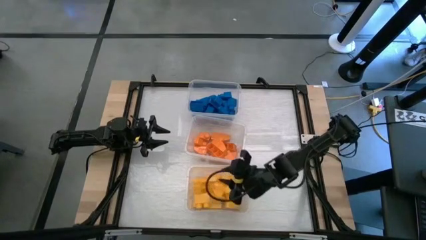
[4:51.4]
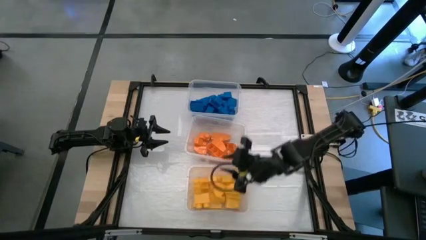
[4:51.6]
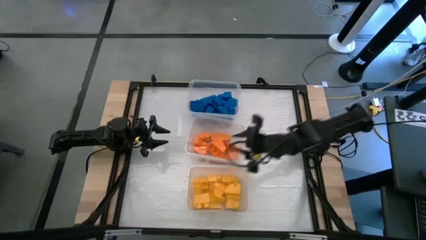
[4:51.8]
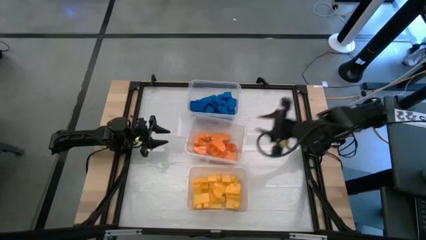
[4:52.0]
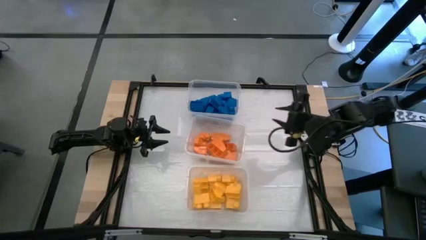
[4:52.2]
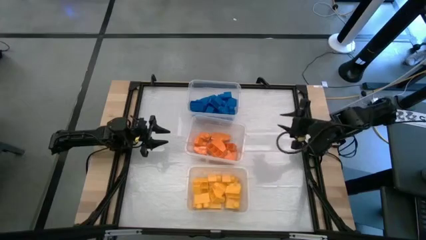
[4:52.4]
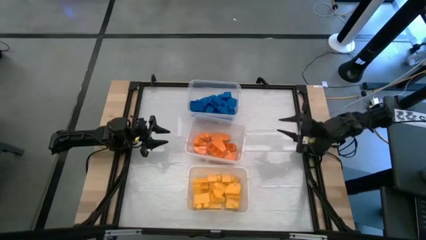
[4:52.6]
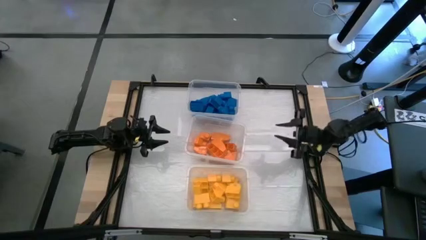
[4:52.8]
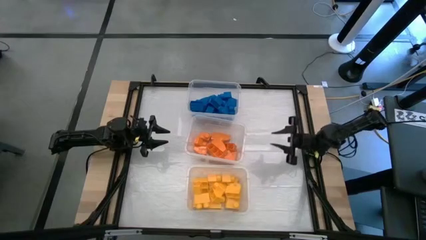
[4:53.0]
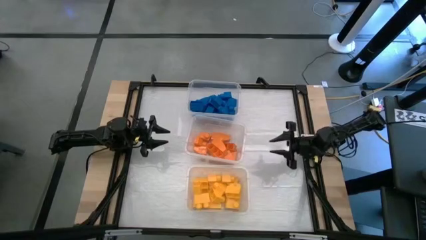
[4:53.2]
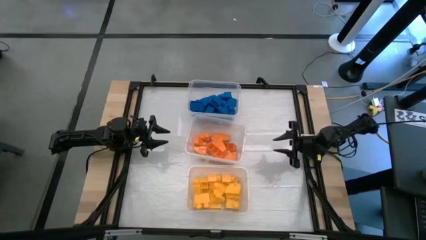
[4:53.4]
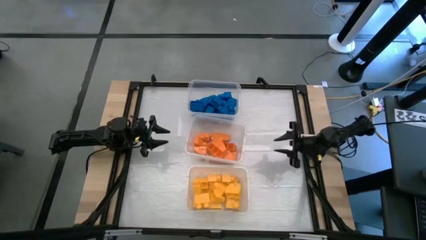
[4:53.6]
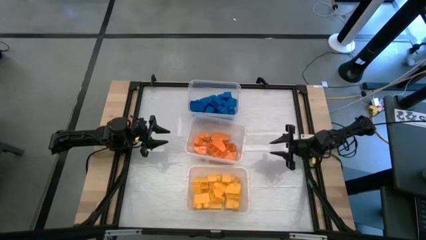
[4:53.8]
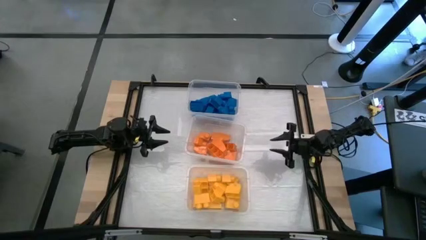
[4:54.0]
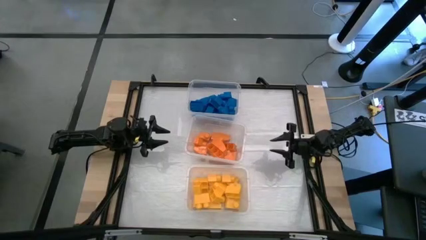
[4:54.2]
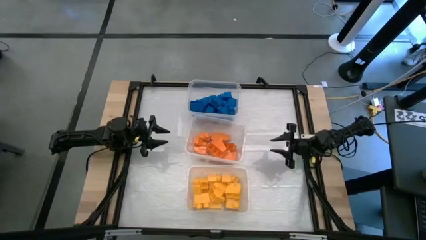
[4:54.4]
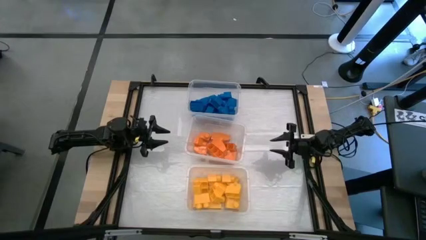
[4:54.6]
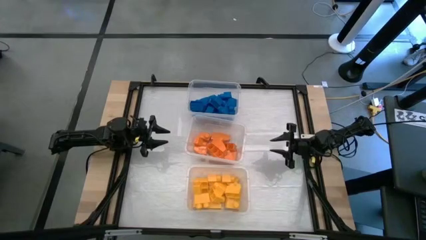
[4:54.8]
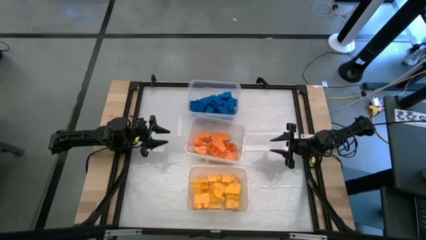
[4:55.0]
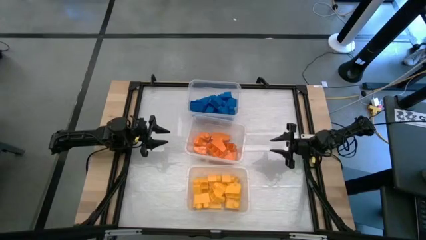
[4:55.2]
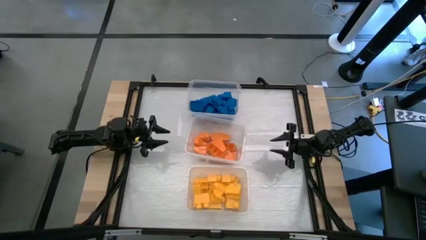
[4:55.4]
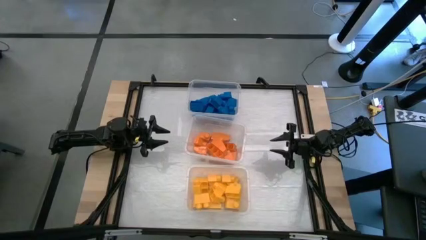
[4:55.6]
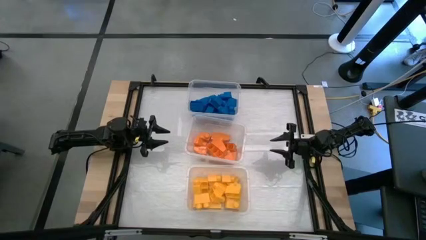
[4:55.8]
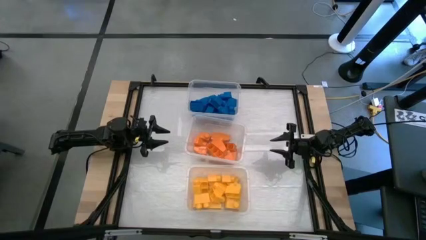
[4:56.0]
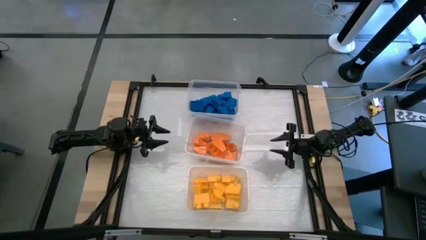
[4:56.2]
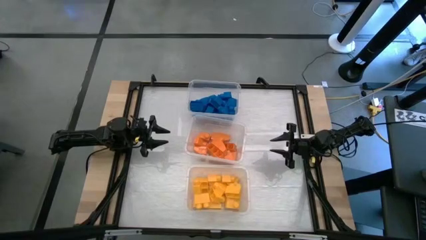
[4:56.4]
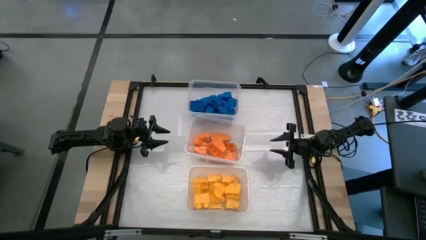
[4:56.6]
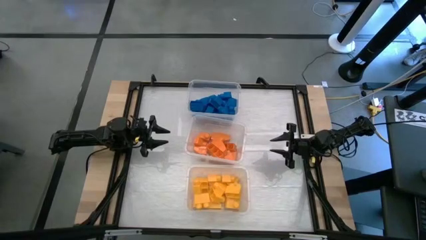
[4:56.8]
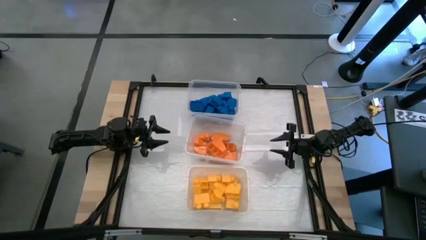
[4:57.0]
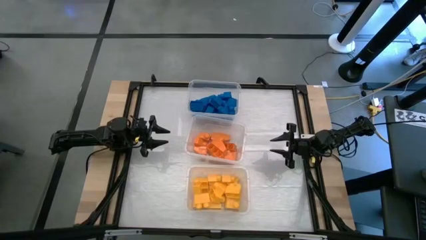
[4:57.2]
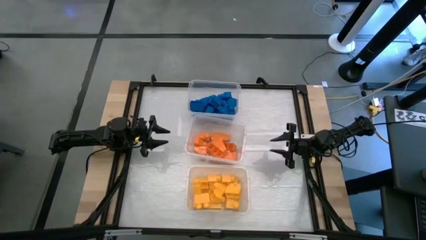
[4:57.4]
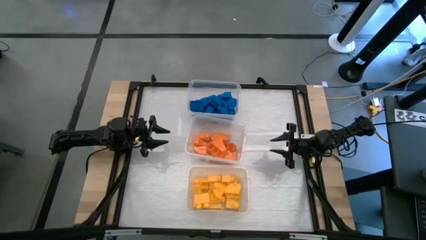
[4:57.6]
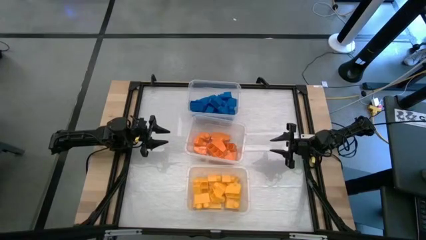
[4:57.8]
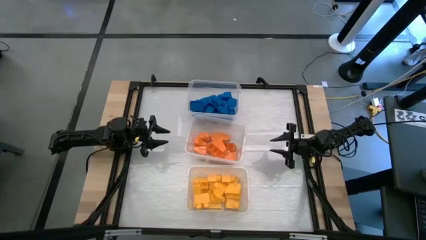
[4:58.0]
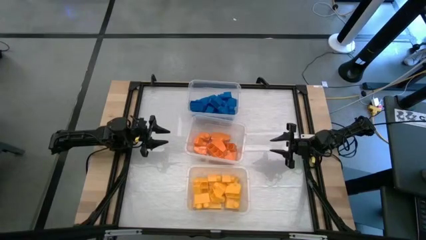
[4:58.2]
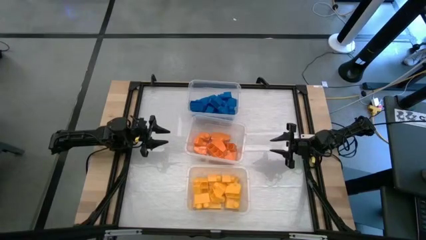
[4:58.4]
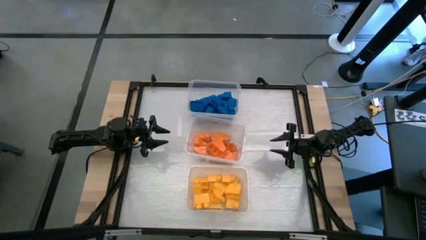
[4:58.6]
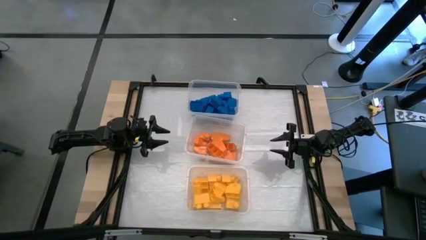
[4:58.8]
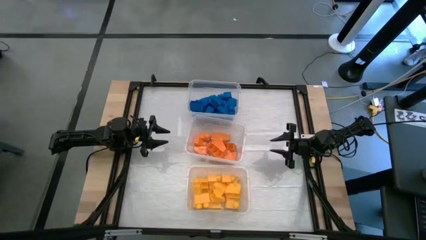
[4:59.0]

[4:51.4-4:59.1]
Task: Sort blocks
Return to Home Position

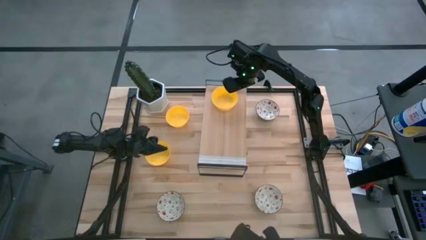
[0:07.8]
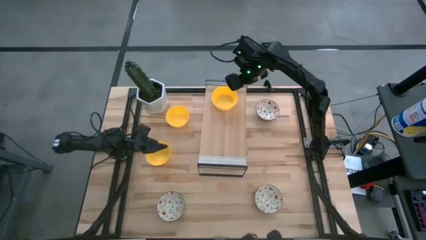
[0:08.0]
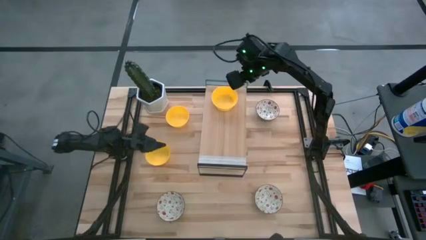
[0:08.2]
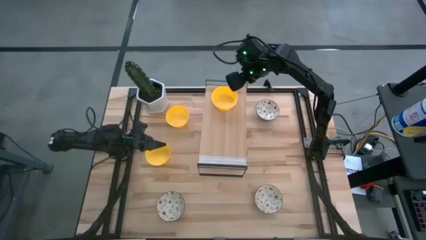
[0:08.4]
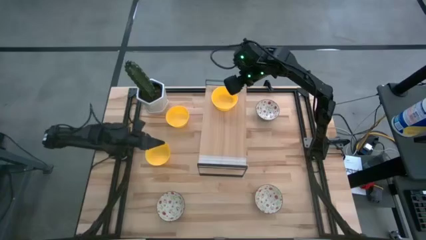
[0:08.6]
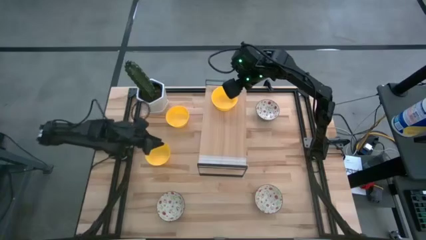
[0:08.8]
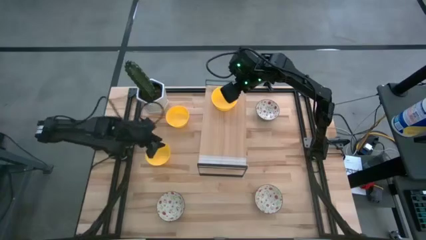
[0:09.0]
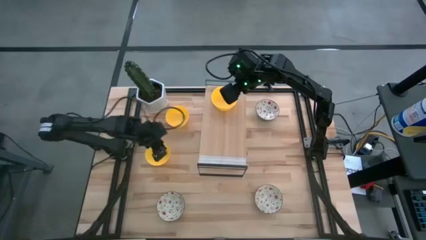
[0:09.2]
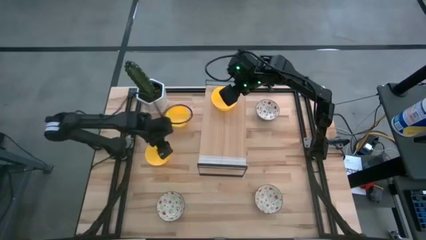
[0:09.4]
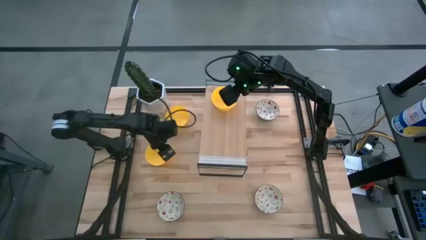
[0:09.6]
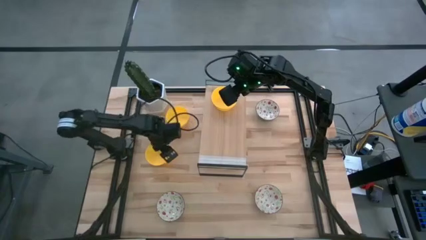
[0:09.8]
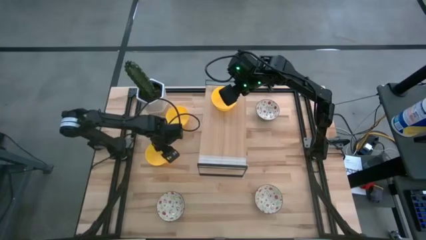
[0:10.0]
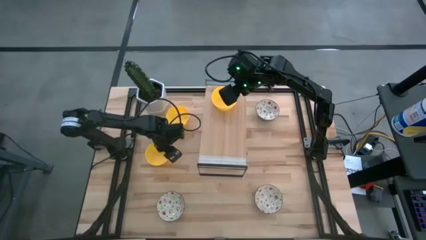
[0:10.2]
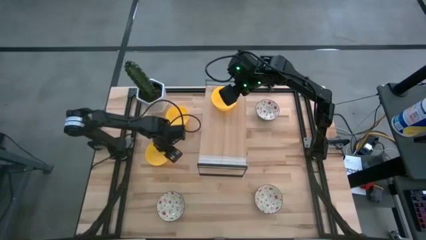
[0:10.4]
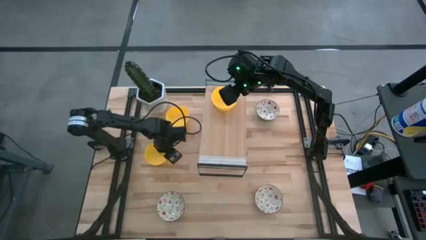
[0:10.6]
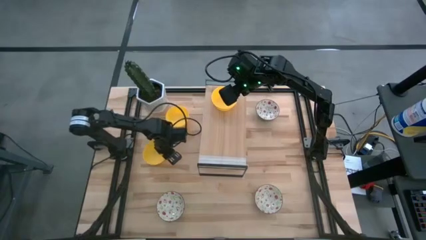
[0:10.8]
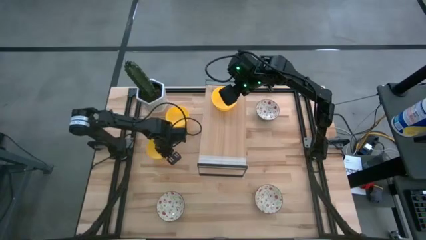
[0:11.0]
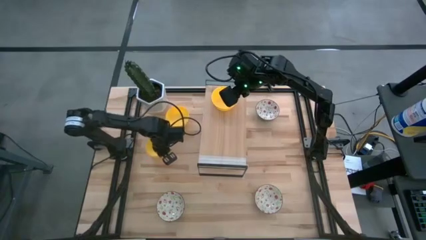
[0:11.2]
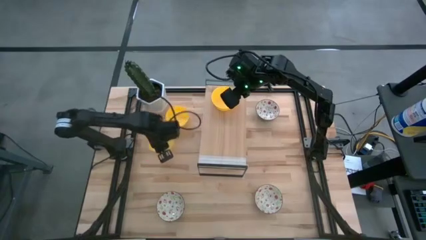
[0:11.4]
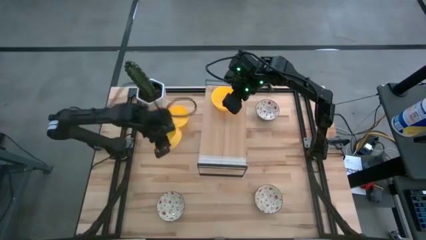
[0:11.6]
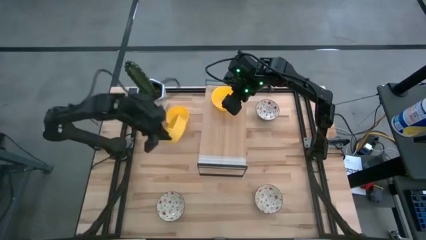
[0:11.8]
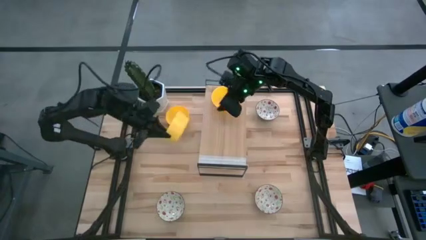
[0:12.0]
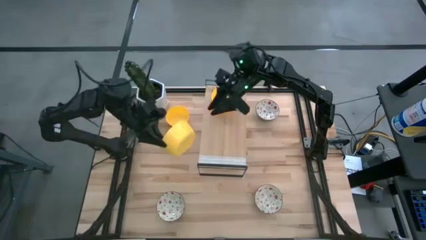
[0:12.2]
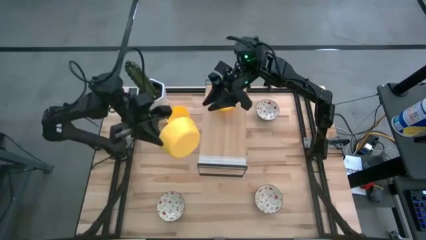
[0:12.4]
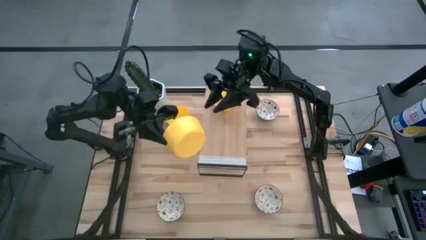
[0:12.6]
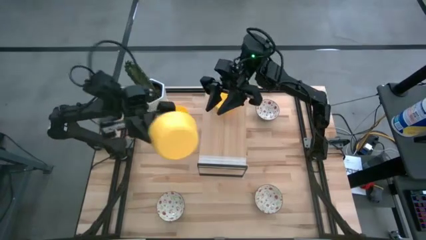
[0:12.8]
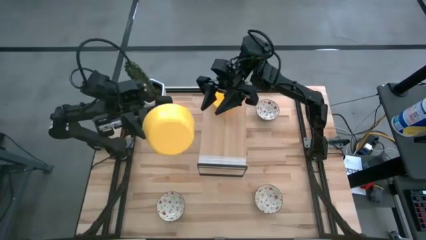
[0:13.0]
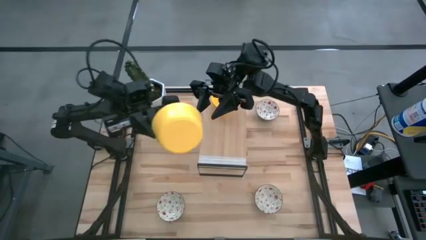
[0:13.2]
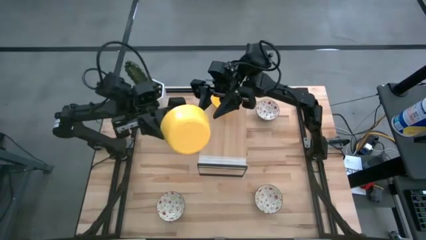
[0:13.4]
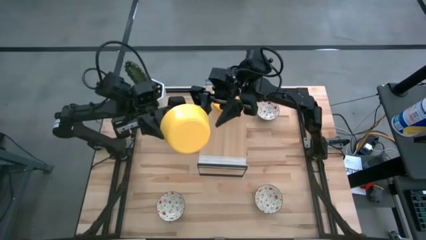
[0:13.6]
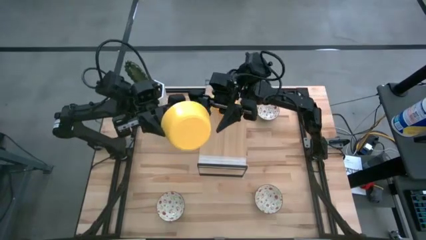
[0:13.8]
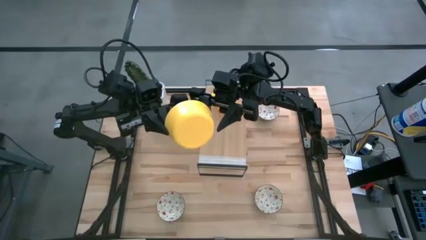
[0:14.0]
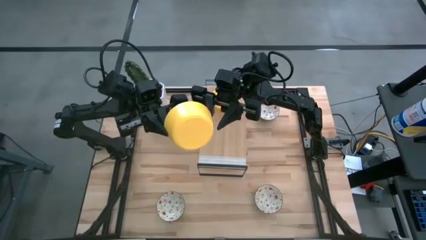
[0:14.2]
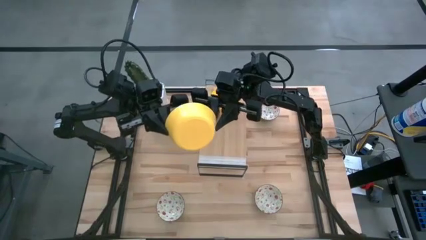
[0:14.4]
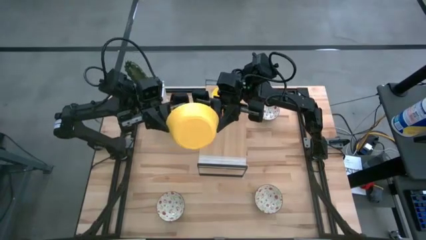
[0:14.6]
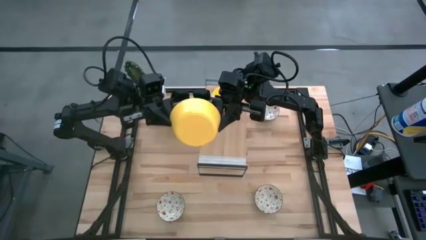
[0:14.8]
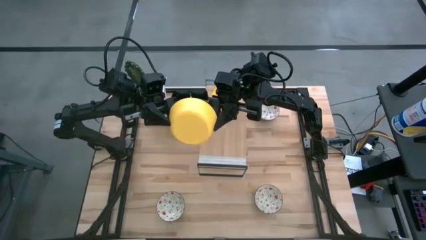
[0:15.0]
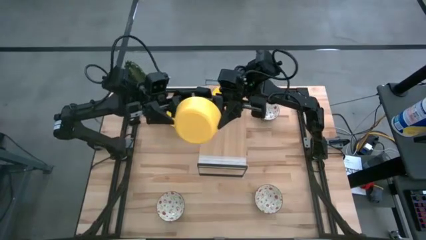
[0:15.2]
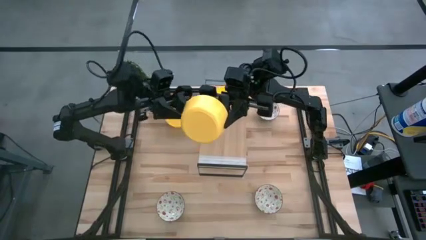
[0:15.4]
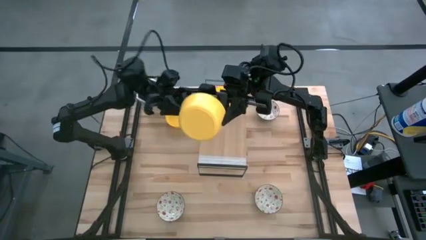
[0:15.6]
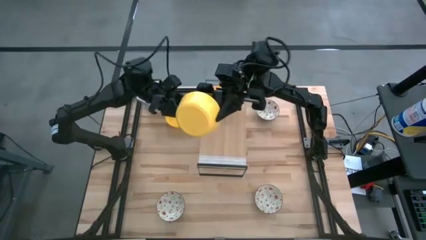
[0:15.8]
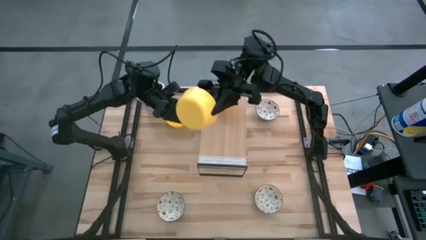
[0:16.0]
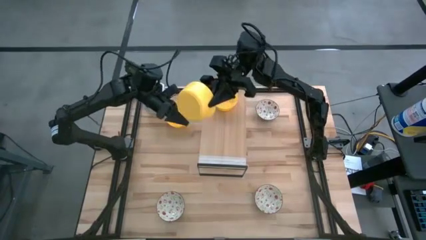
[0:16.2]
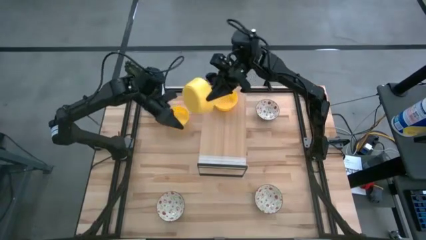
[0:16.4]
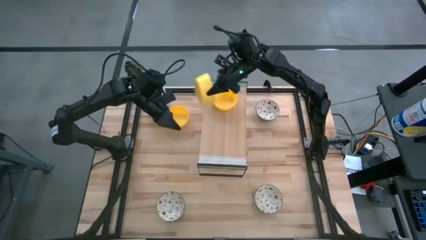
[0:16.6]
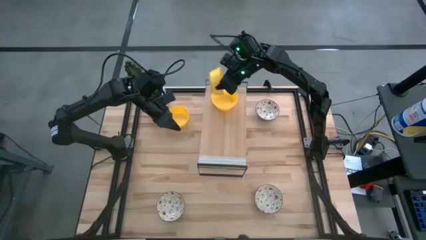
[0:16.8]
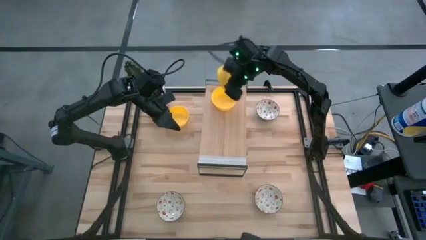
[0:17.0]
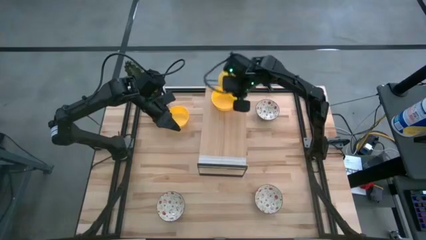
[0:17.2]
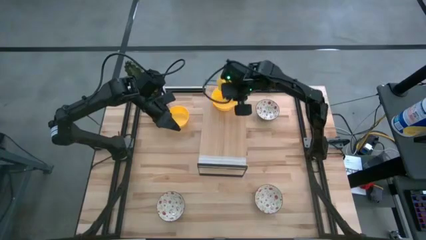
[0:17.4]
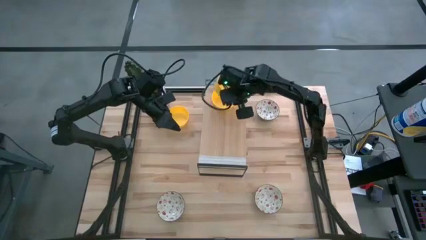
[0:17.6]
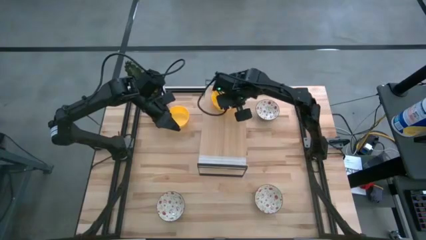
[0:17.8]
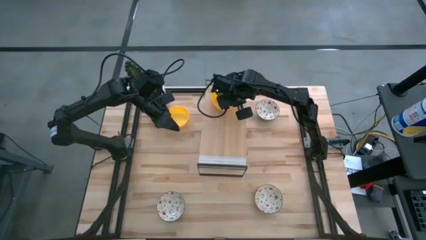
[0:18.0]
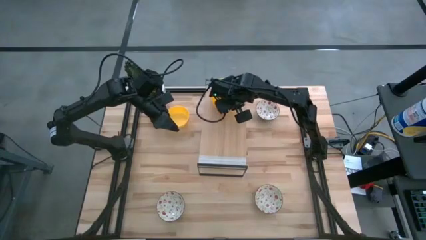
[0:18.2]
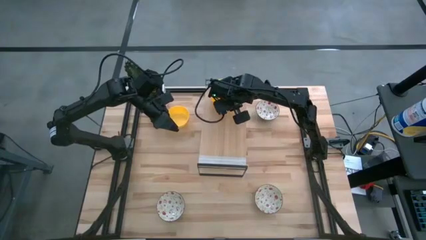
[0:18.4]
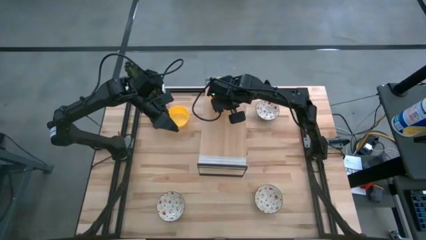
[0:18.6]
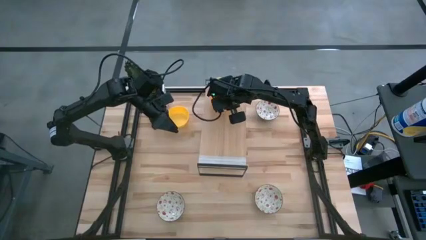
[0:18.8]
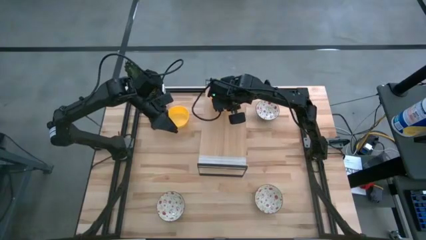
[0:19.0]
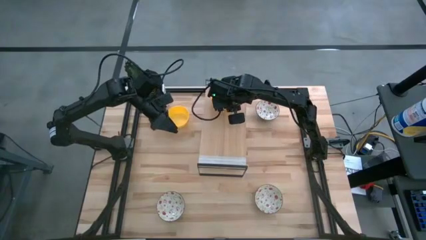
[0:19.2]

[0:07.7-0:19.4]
Task: Pick & Place Mini bowls
Stack the bottom yellow bowl on the yellow bowl on the shelf
